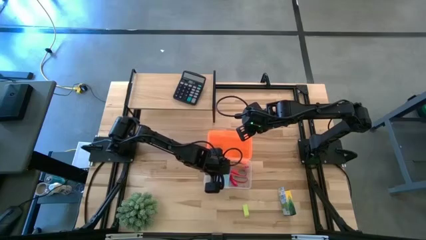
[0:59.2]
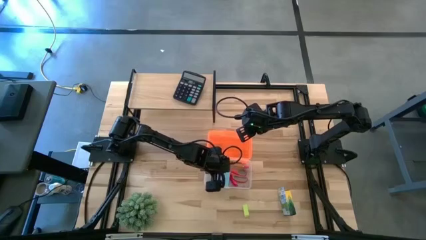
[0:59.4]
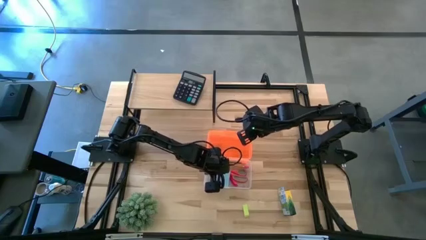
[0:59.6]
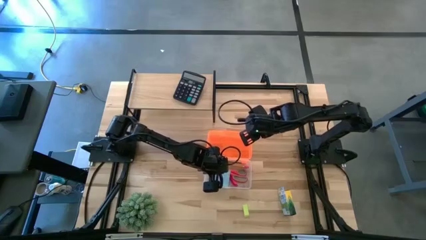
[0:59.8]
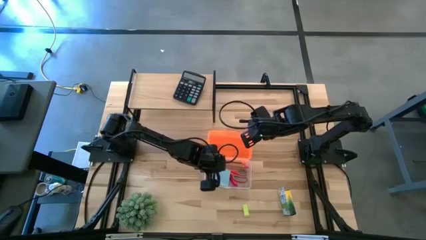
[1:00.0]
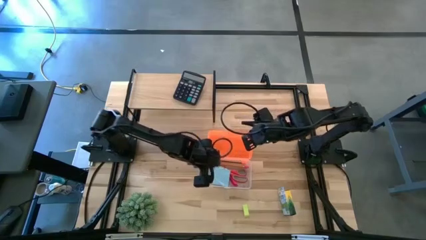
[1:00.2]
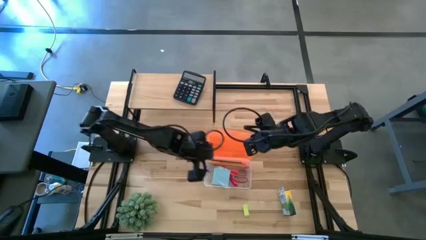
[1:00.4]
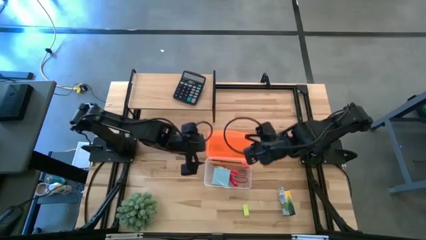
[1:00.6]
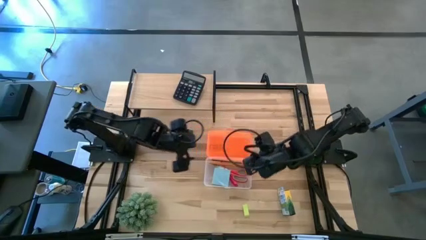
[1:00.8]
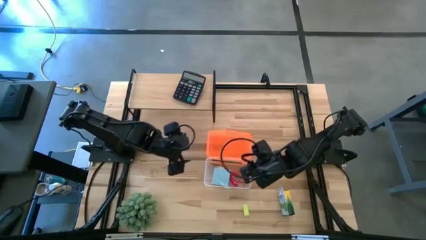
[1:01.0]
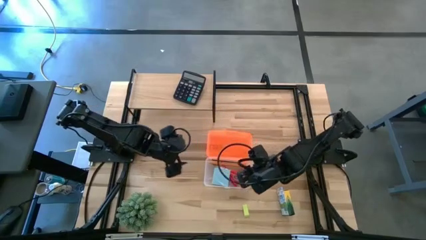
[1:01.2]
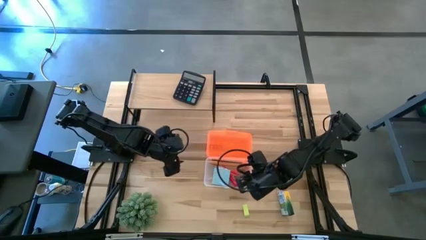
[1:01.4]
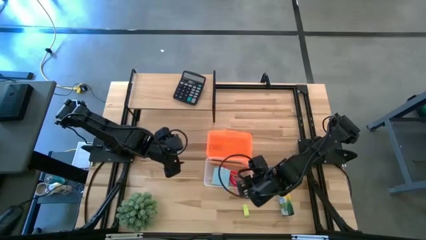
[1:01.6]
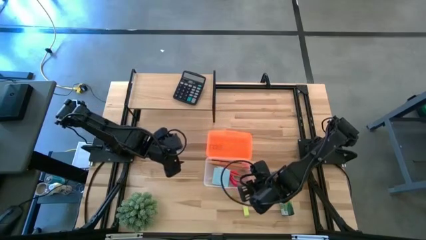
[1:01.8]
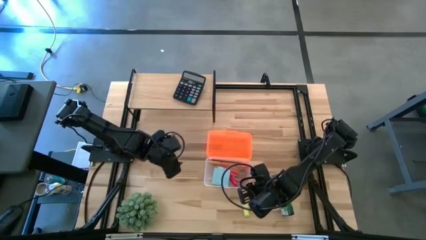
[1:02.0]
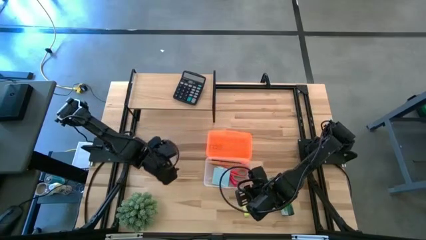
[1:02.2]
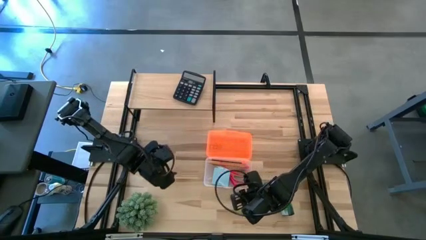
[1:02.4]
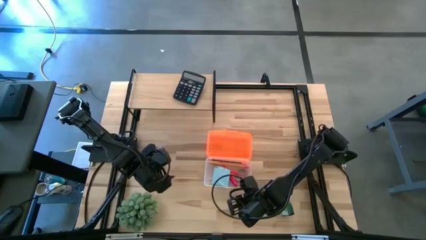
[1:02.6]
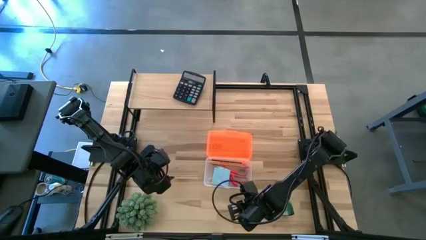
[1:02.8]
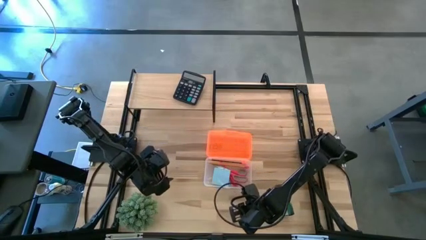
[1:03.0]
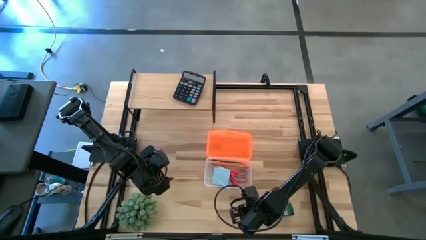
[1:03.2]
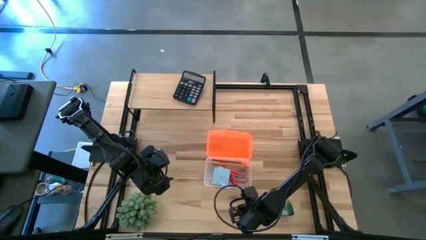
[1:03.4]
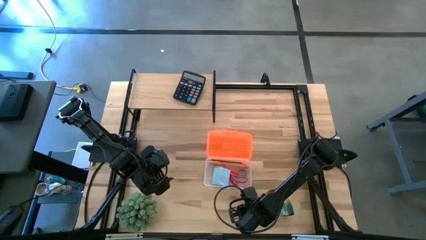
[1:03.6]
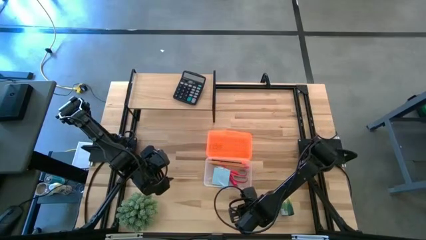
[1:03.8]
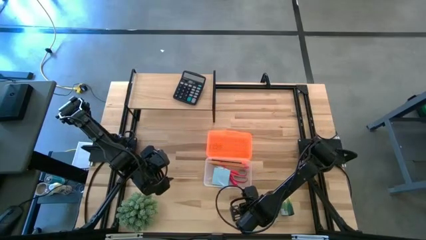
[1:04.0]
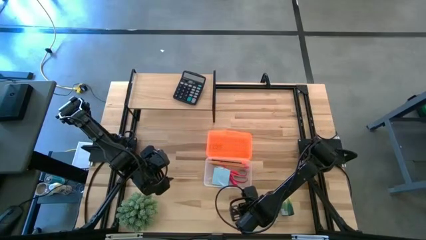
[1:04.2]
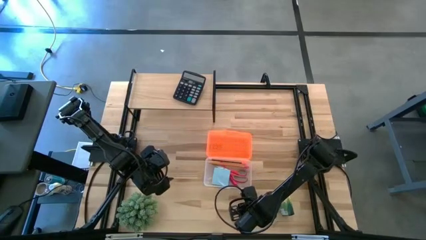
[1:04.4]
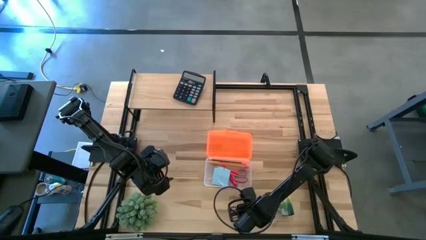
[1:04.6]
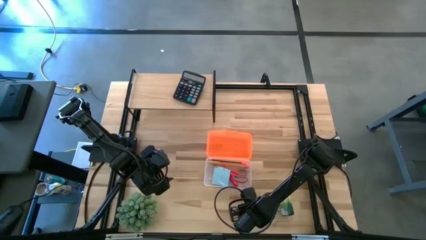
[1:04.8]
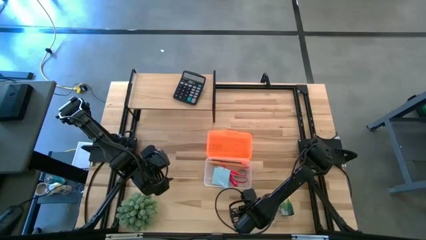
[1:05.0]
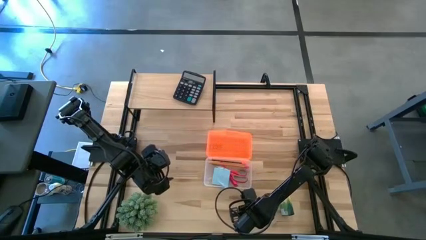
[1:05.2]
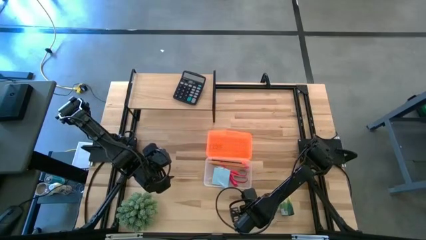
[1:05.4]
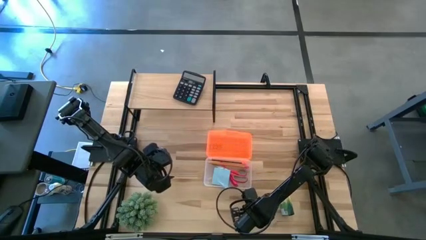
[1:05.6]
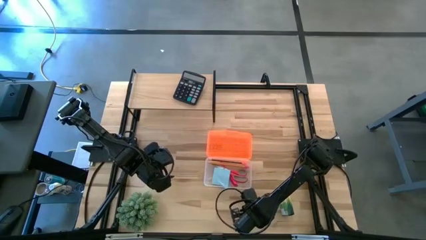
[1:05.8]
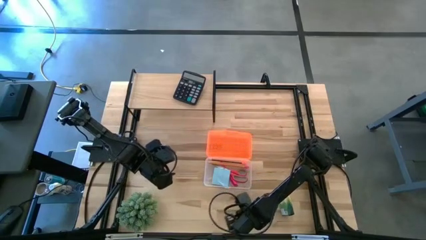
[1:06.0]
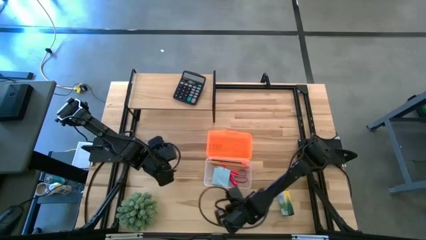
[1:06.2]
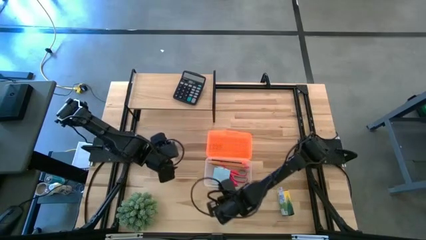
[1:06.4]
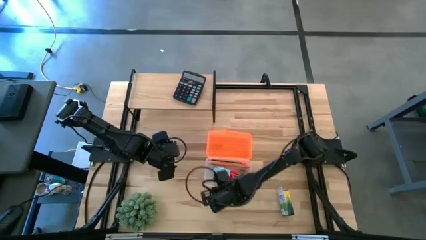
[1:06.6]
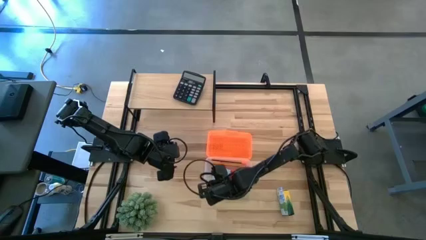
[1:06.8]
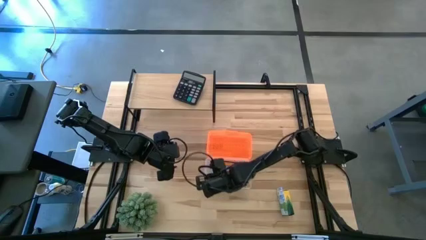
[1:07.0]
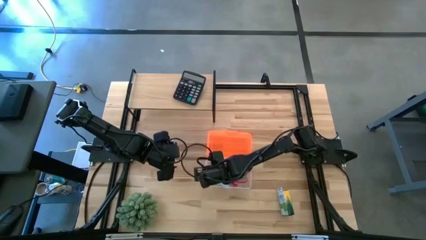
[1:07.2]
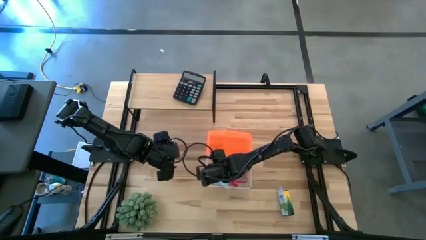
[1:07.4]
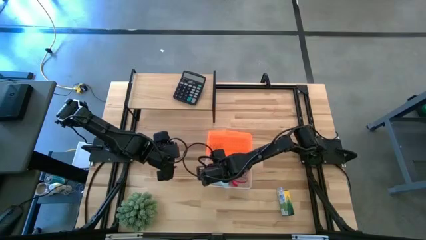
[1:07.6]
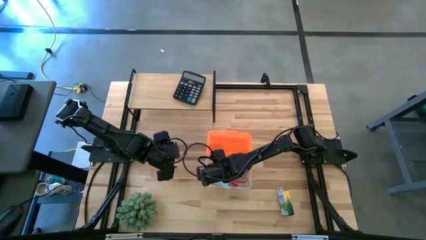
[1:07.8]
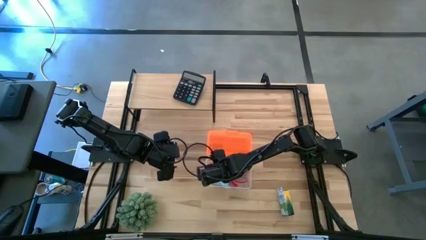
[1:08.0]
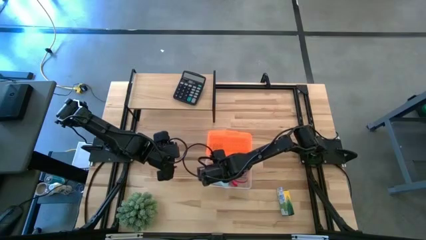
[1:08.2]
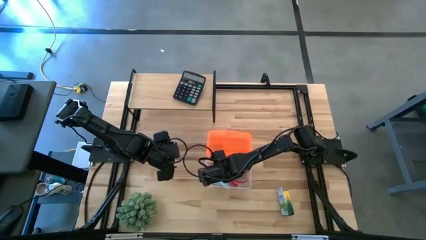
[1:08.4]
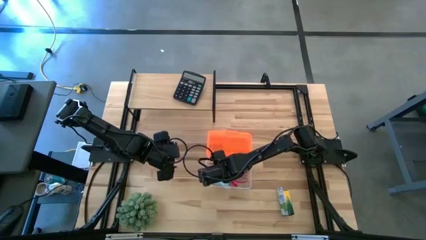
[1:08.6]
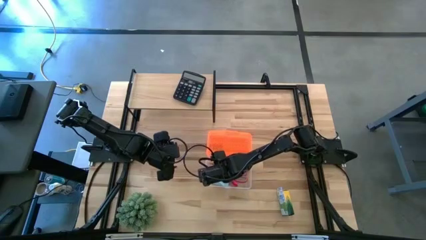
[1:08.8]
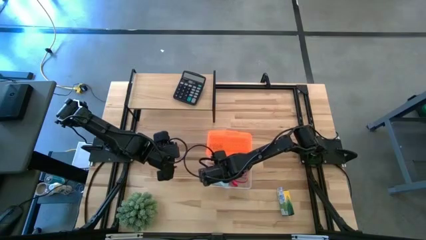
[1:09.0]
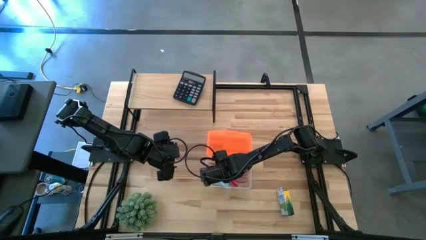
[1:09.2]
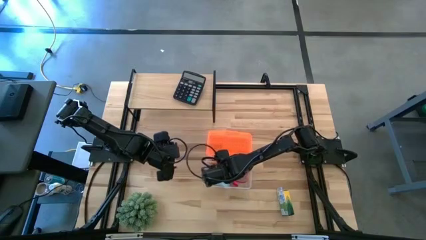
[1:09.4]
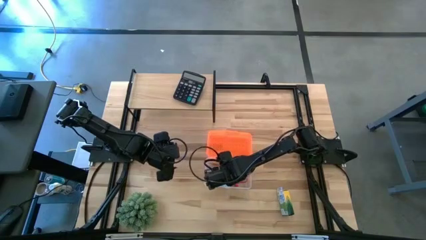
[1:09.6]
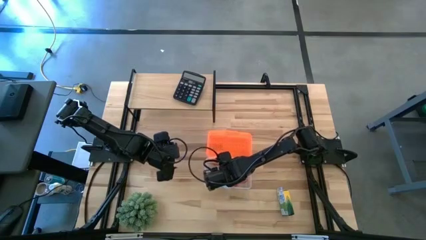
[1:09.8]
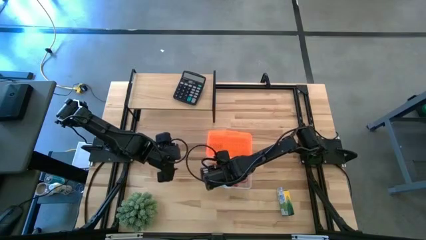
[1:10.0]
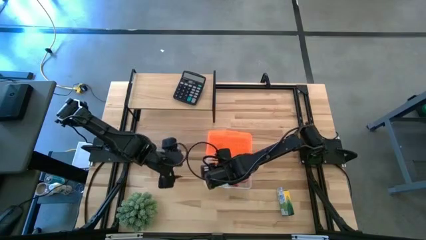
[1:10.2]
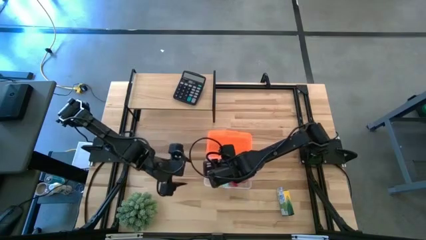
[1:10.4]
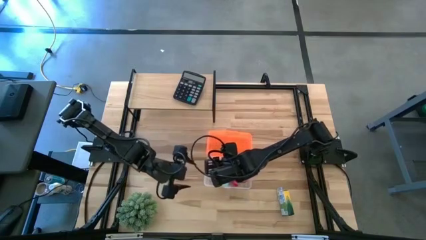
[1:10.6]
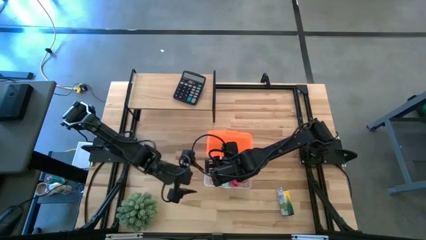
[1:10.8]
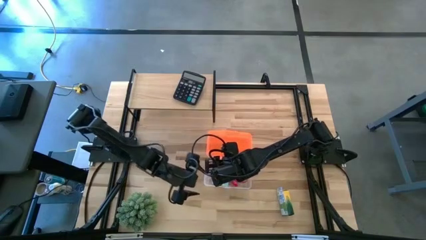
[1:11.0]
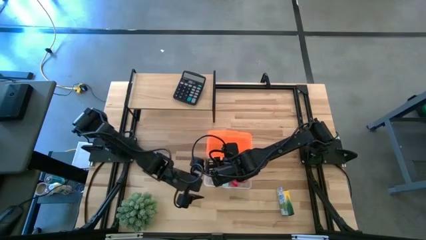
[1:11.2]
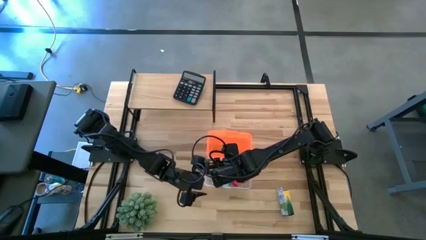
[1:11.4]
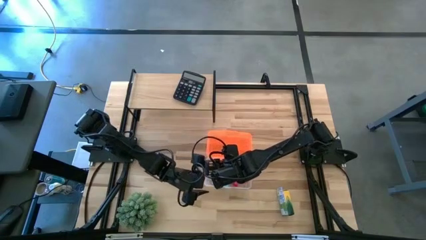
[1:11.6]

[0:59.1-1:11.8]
Task: Pack school essentials
Put the eraser into the supply box
